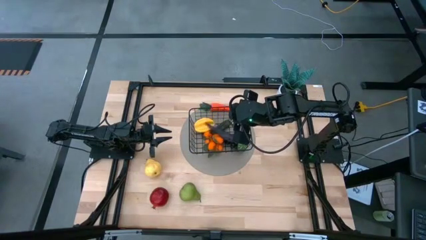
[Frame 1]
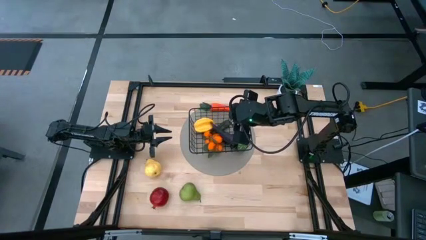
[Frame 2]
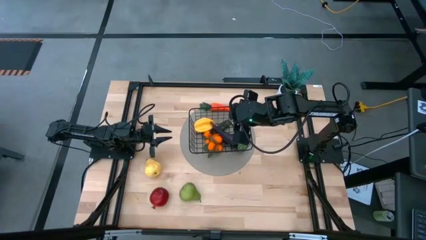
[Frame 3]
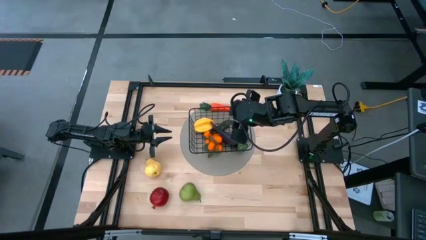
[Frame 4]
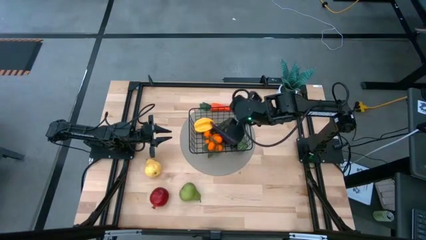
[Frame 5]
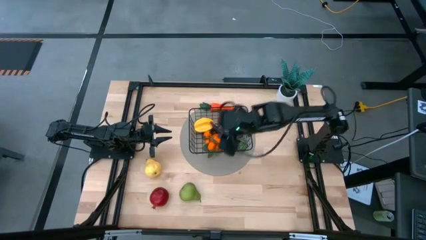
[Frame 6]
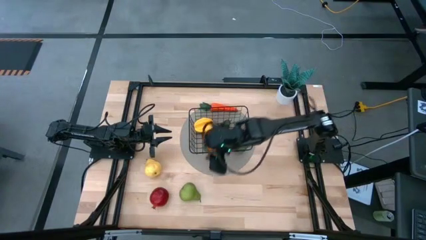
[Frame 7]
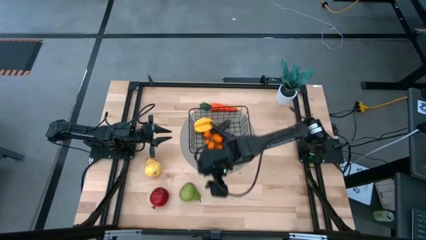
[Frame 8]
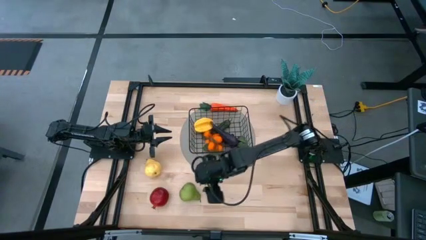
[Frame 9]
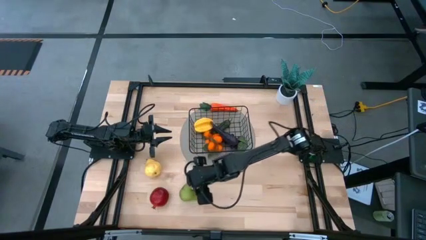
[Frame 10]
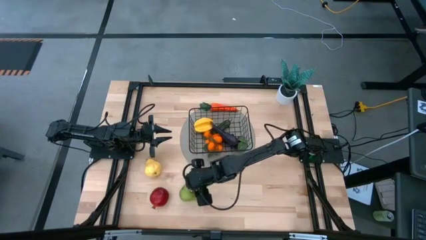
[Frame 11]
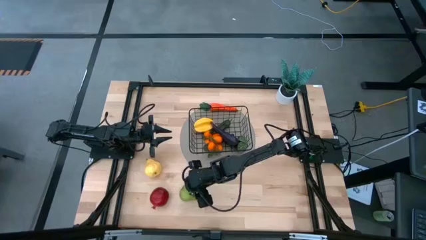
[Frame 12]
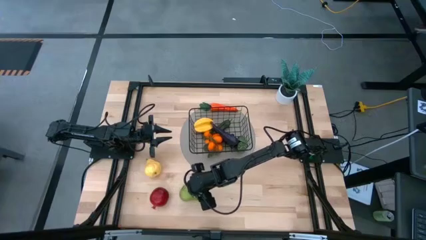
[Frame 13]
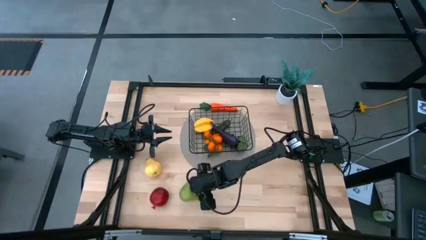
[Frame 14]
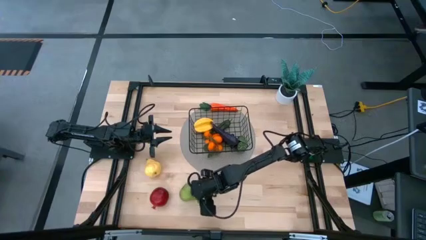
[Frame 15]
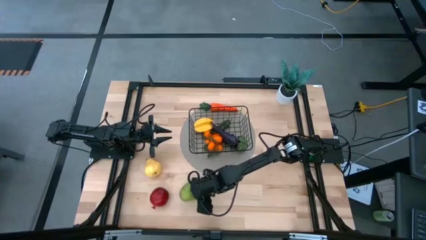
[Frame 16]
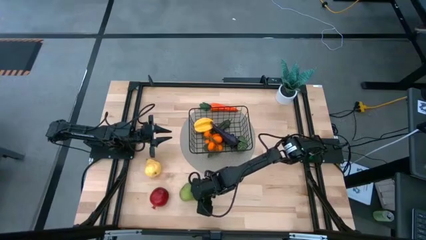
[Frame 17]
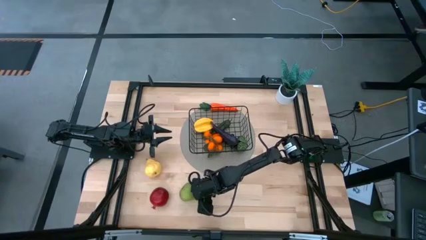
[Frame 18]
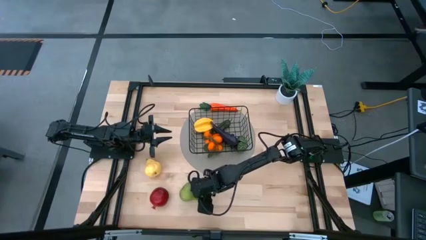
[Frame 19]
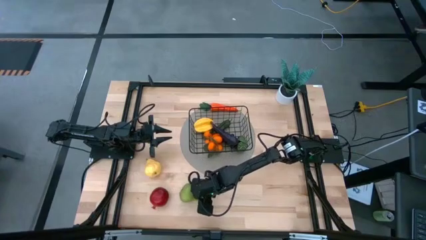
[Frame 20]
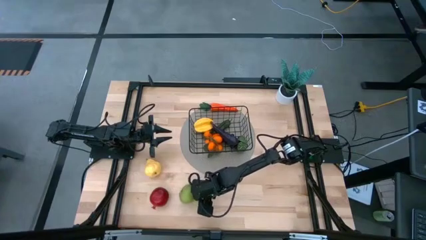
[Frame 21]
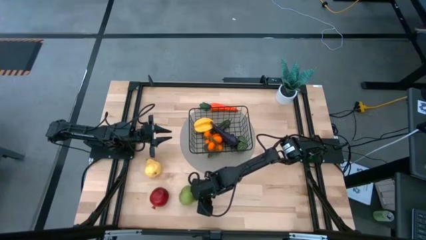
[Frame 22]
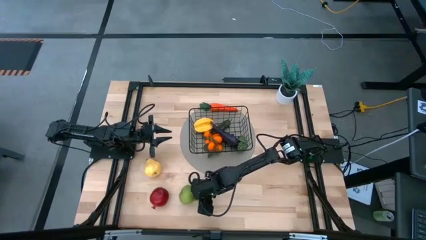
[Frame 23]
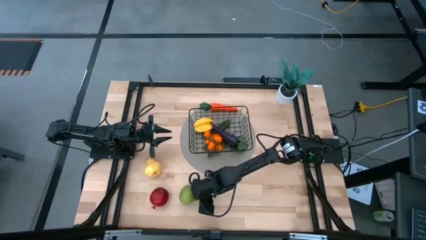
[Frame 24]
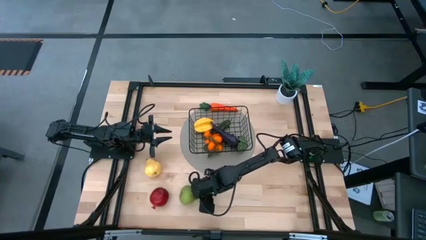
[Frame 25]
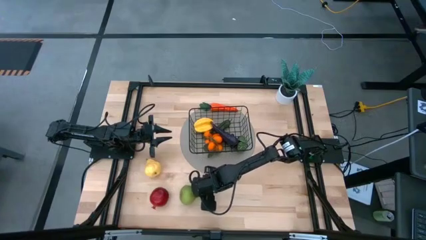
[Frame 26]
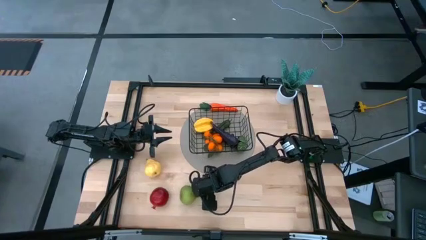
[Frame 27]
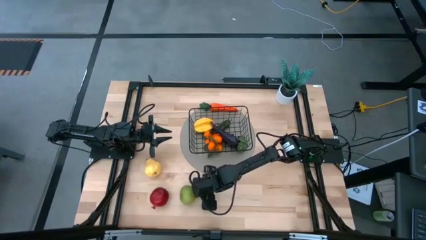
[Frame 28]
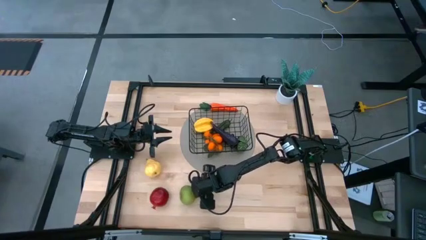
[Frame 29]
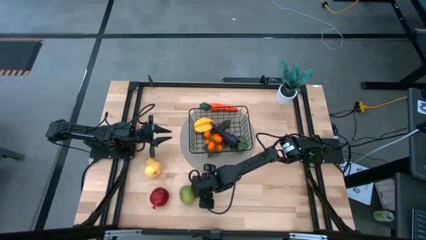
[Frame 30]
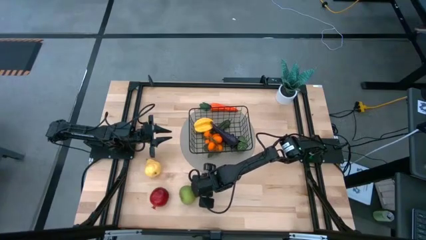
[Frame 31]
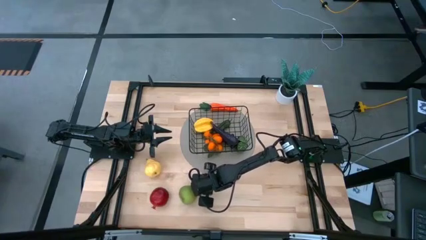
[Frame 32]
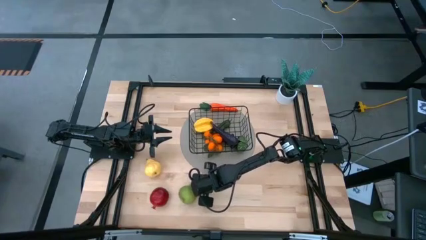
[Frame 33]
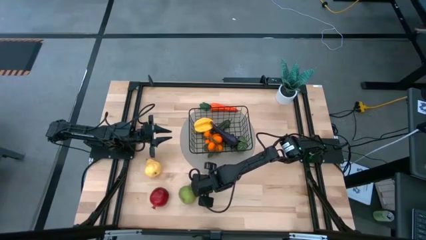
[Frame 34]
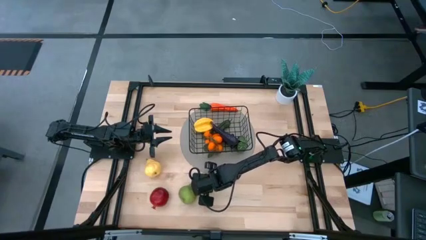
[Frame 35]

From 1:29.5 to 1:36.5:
Task: Build produce basket
Put the green pear in the mesh basket

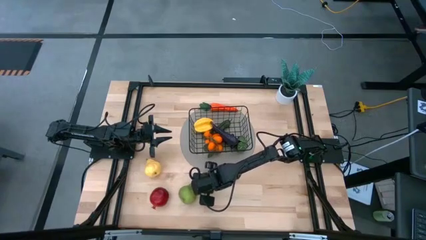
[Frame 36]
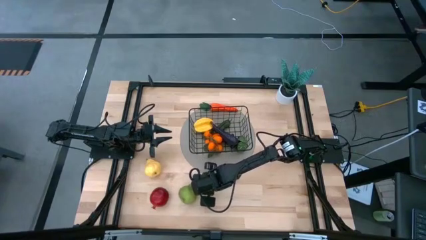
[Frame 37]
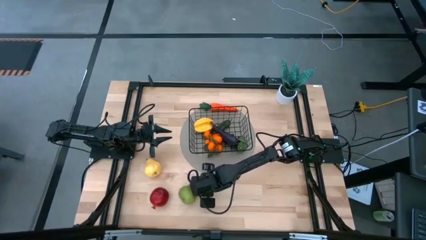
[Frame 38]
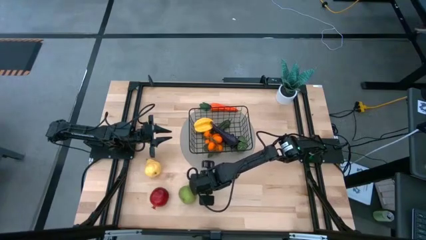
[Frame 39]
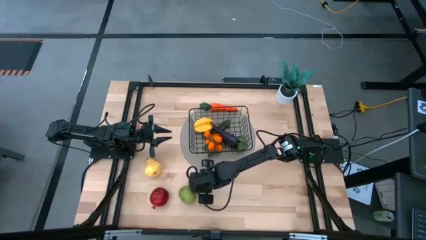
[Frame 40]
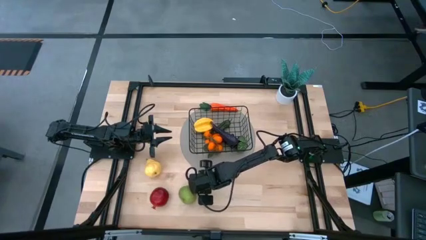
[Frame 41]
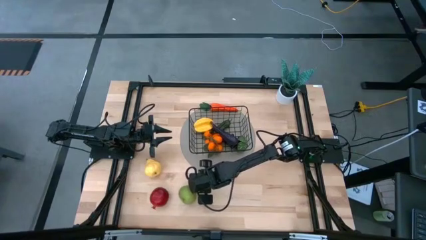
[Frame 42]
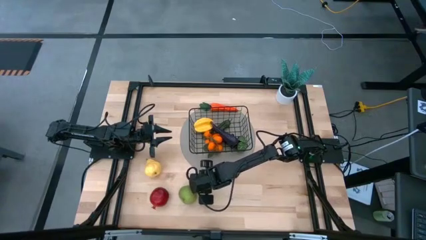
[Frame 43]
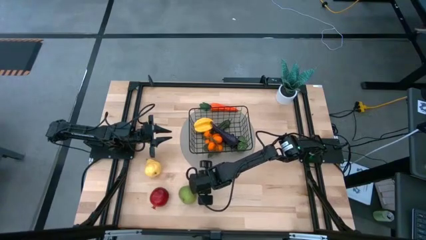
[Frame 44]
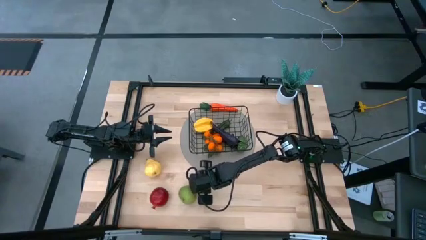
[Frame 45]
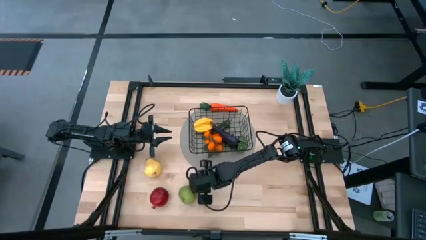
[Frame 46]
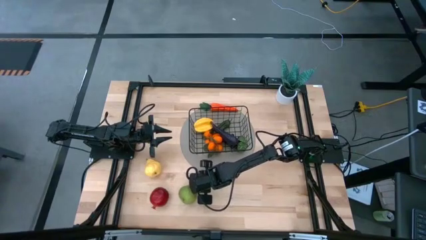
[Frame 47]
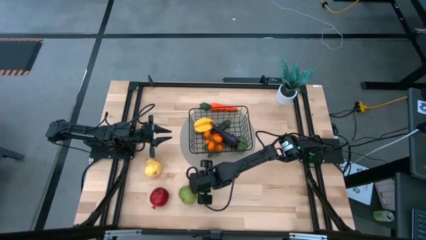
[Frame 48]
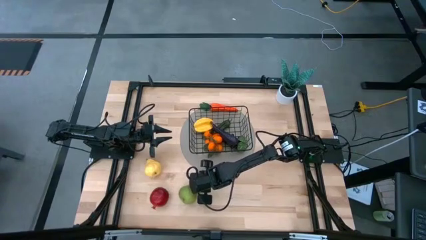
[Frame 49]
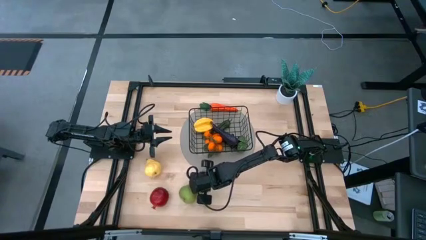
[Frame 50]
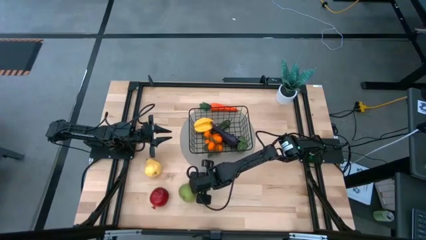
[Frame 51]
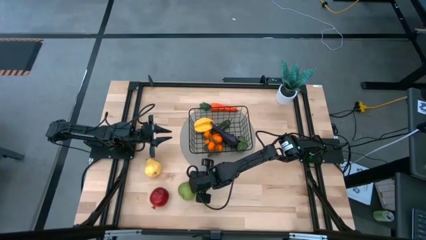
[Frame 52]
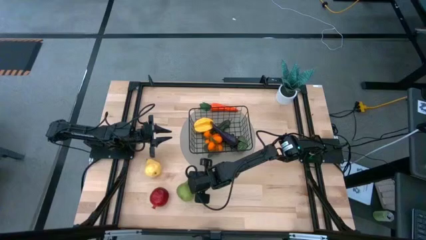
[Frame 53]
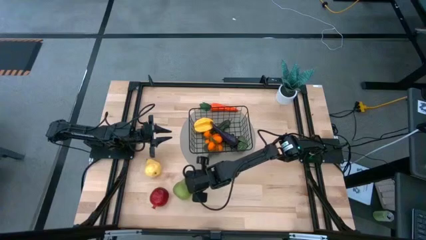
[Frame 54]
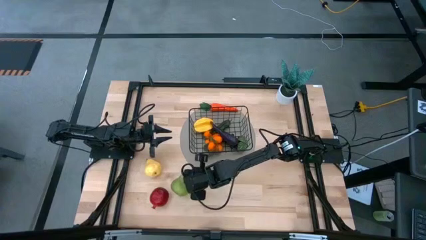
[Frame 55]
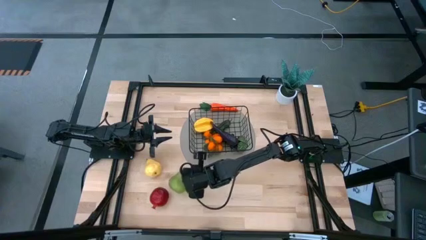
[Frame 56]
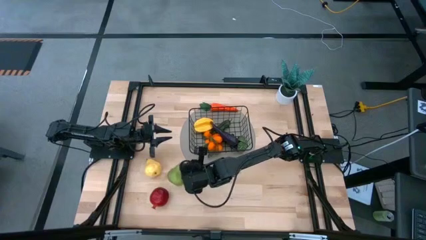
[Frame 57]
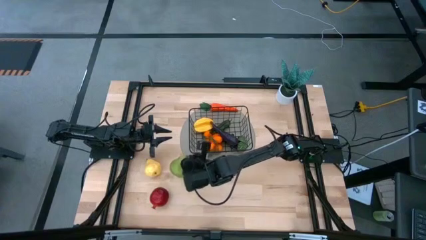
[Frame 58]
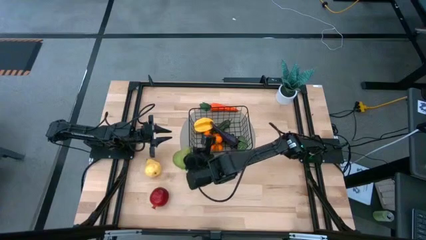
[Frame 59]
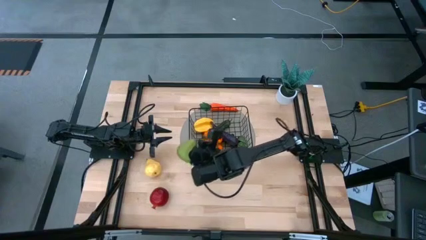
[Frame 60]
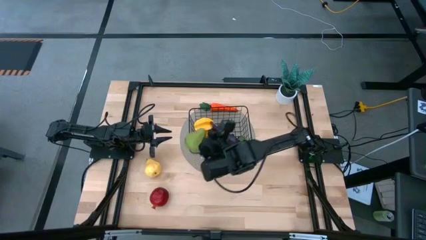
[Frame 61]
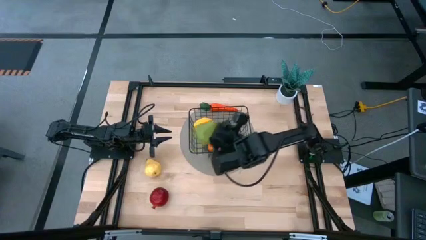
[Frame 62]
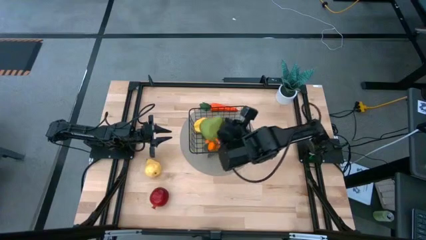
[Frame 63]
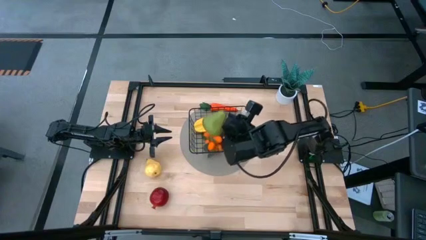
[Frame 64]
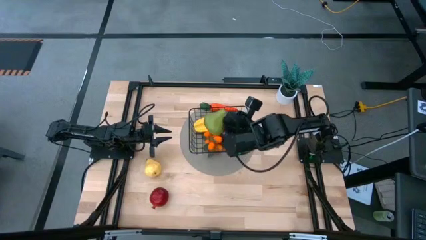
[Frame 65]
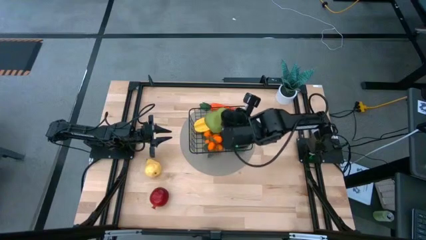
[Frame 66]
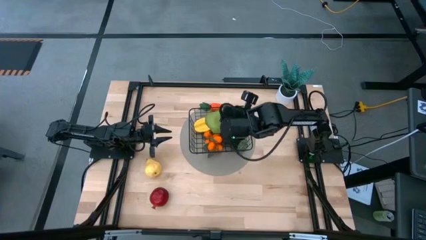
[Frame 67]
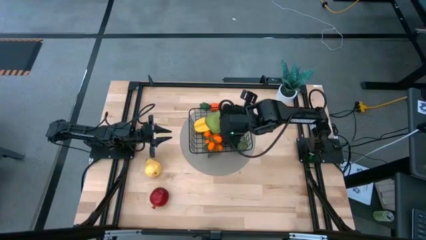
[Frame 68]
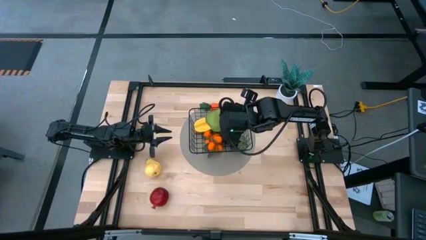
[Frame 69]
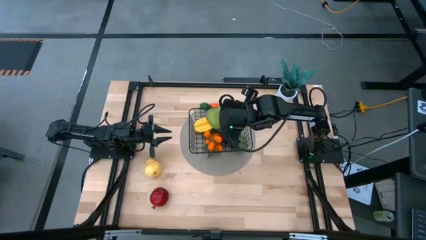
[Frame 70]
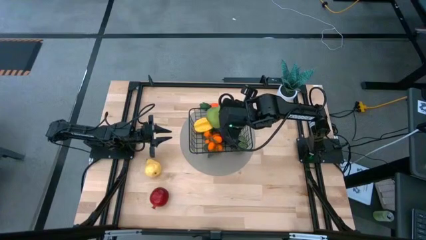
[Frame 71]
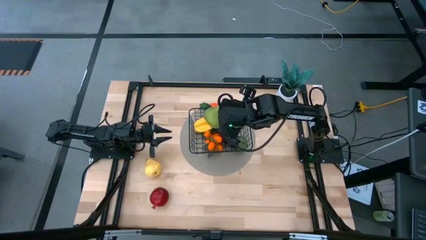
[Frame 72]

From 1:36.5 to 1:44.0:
Put the green pear in the mesh basket

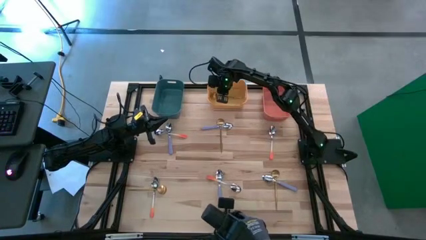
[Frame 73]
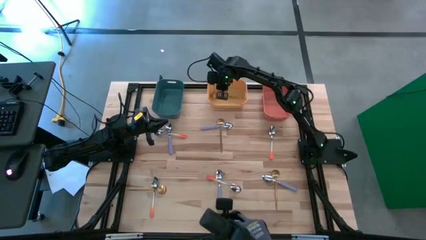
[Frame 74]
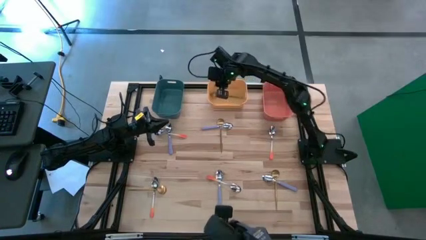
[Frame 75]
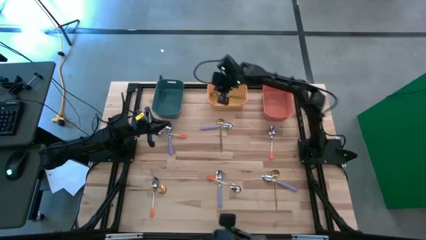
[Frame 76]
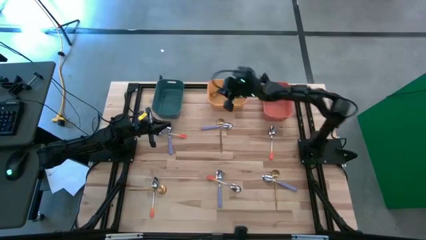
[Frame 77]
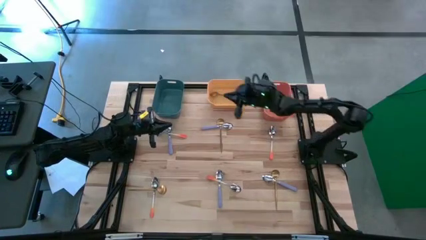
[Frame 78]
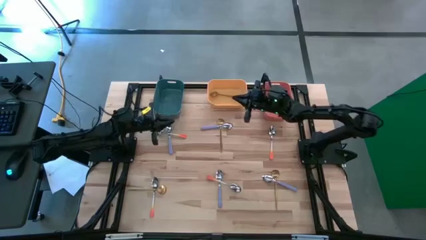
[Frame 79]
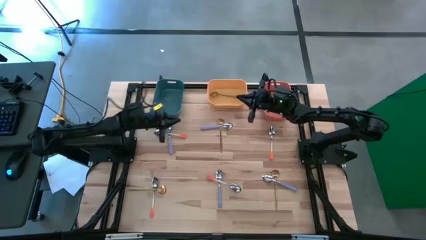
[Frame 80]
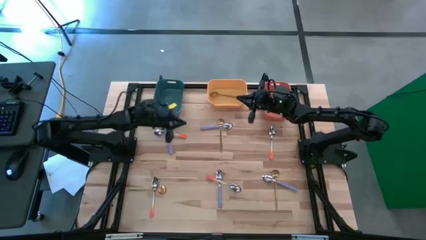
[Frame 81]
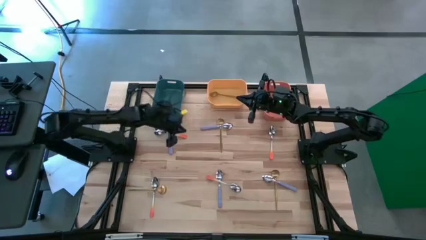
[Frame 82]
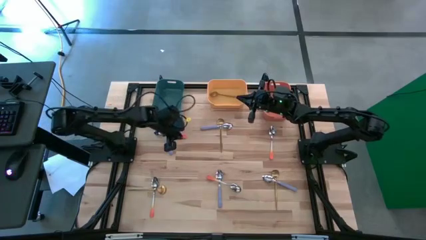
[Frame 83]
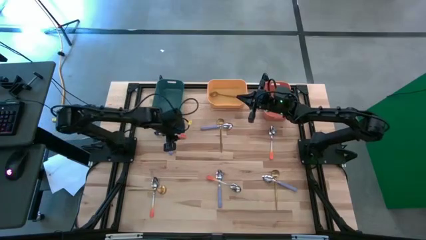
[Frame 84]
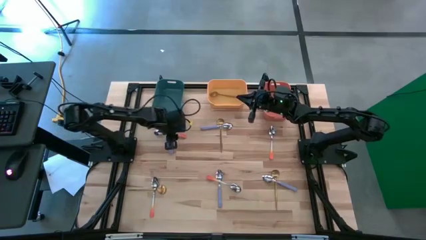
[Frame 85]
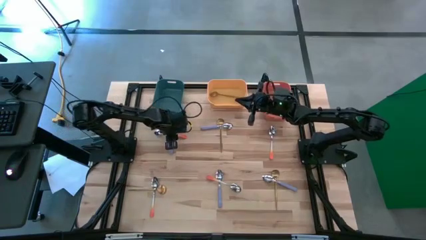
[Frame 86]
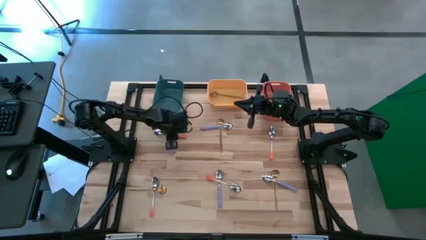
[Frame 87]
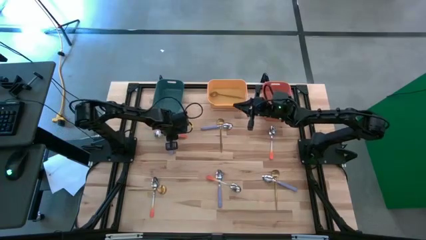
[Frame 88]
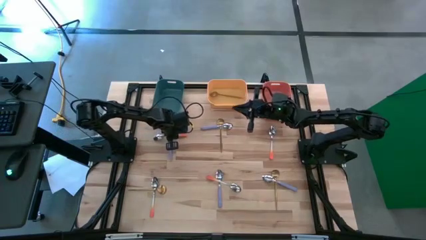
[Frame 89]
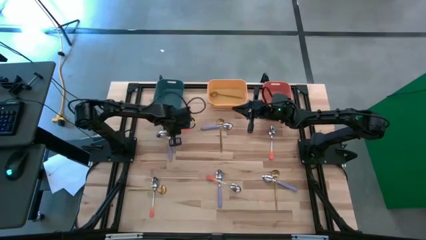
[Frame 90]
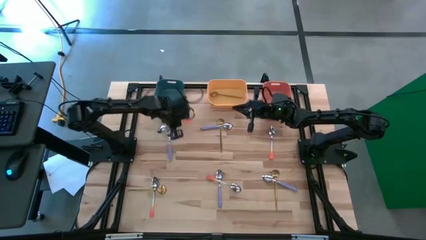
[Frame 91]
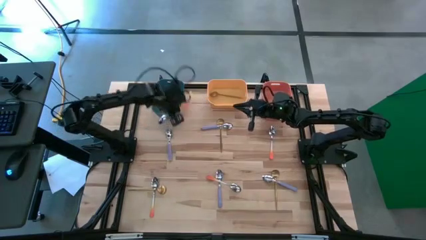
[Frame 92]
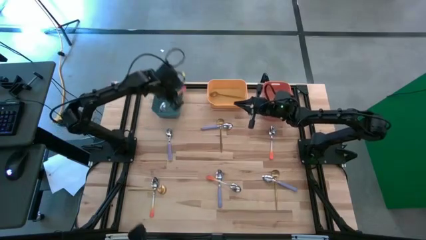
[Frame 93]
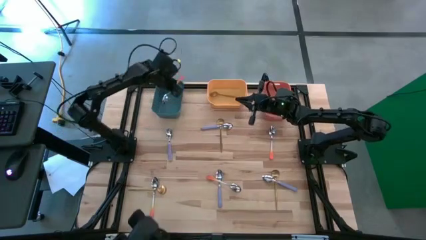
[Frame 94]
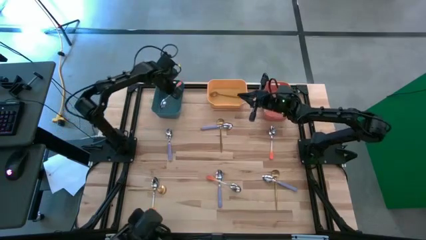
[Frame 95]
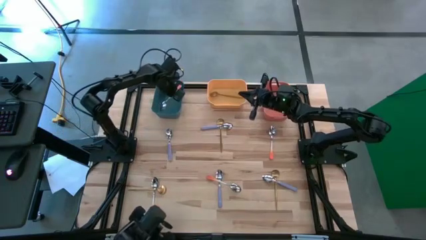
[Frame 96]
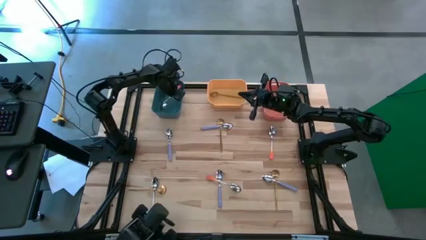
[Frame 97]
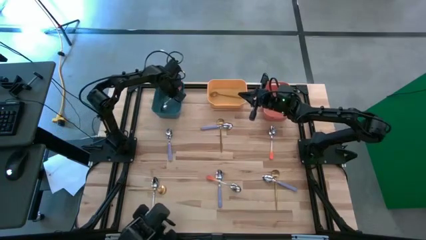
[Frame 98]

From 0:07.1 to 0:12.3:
Task: Sort silverware by color (type)
Put the top left orange spoon into the blue bin
